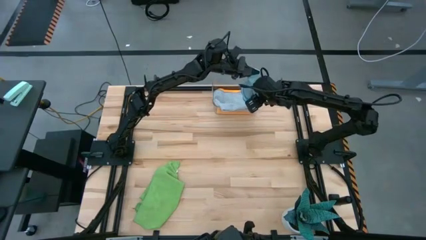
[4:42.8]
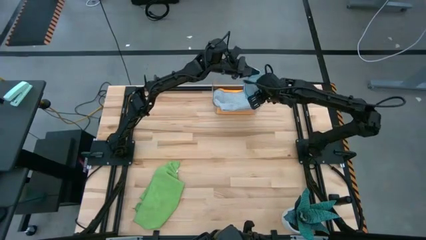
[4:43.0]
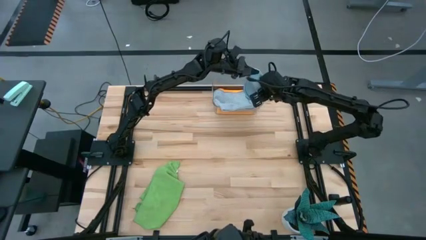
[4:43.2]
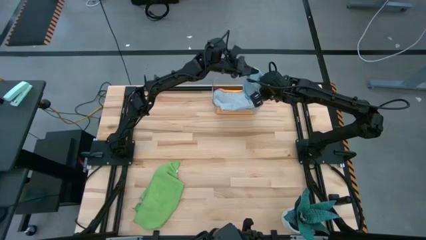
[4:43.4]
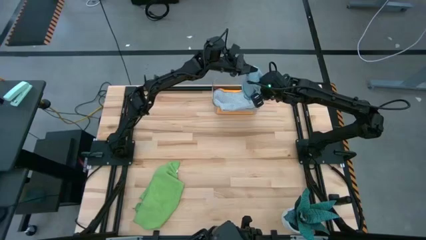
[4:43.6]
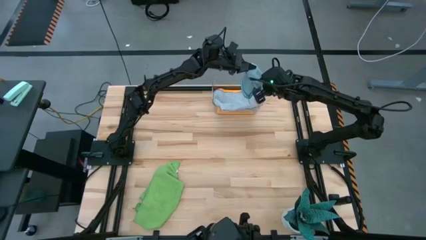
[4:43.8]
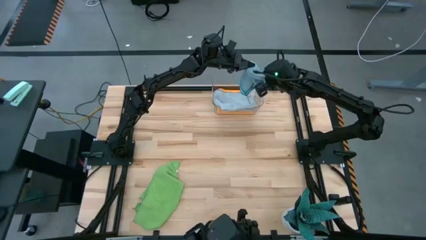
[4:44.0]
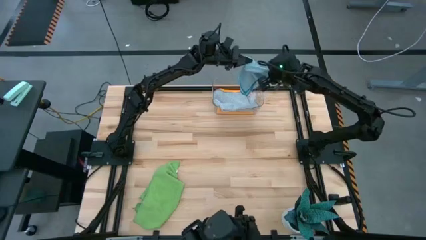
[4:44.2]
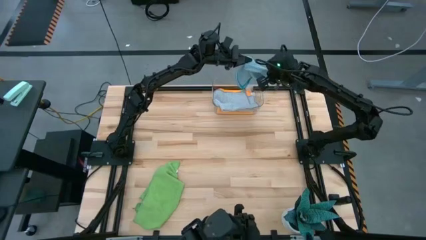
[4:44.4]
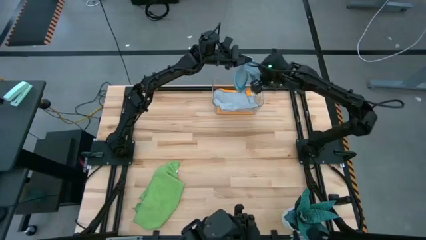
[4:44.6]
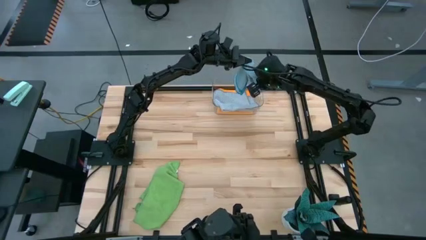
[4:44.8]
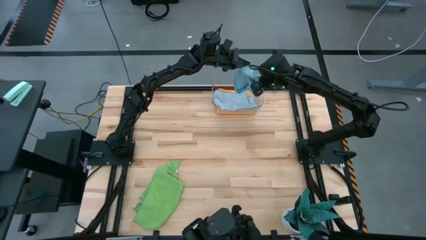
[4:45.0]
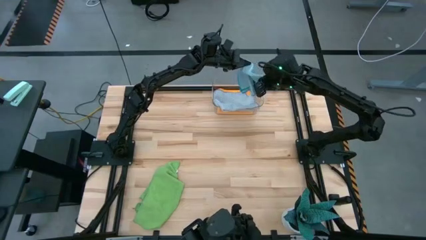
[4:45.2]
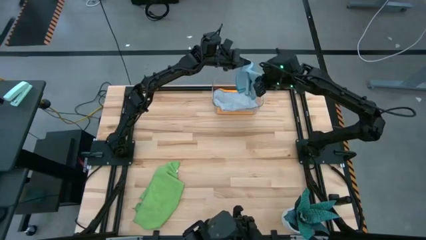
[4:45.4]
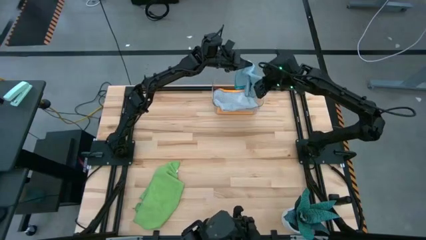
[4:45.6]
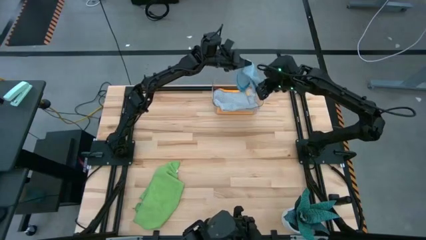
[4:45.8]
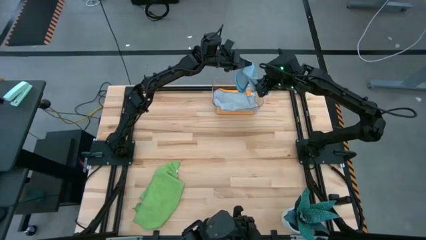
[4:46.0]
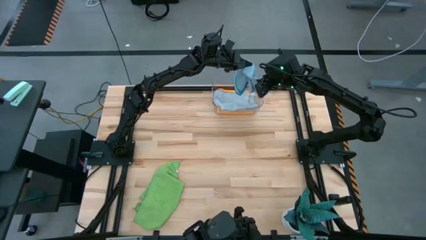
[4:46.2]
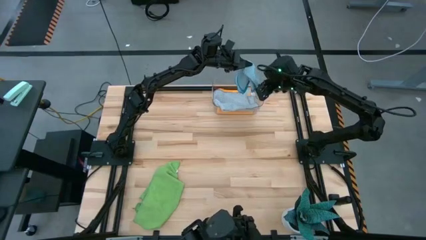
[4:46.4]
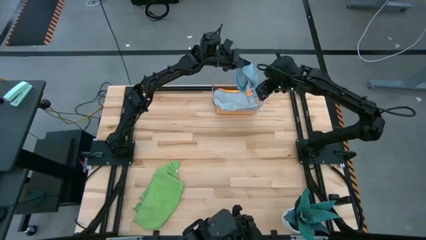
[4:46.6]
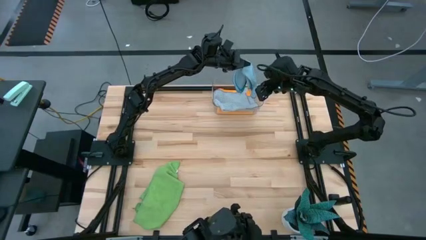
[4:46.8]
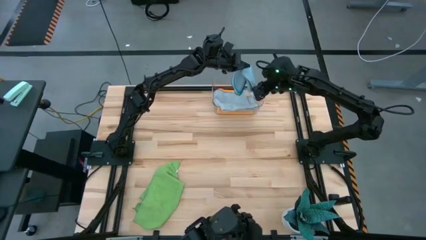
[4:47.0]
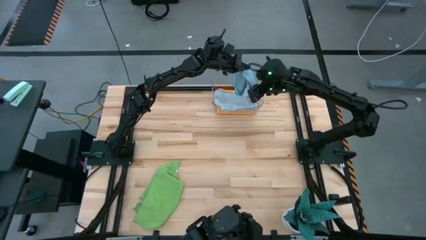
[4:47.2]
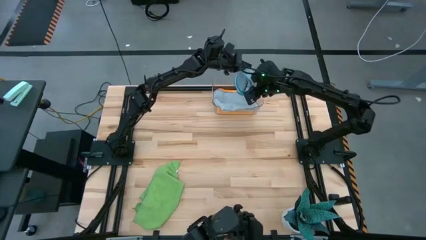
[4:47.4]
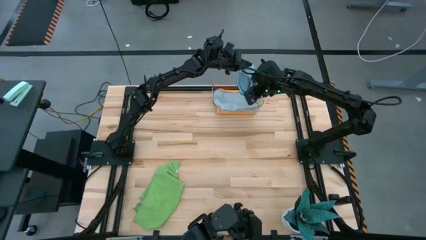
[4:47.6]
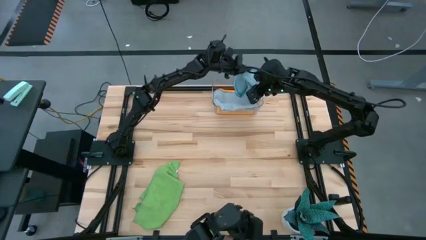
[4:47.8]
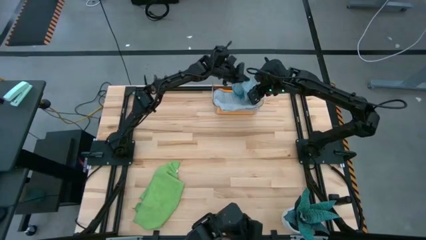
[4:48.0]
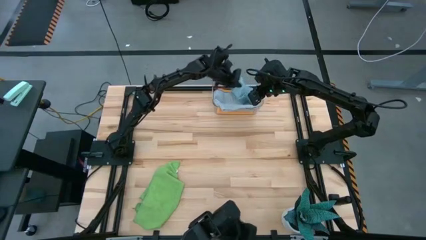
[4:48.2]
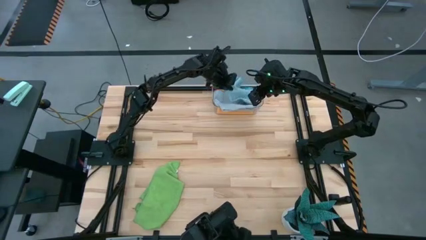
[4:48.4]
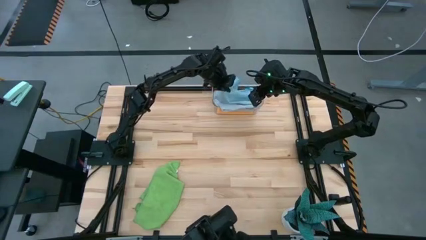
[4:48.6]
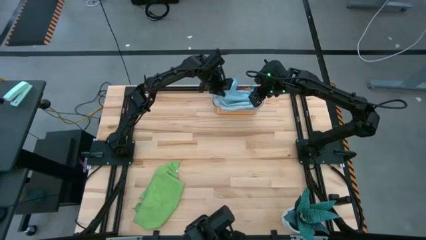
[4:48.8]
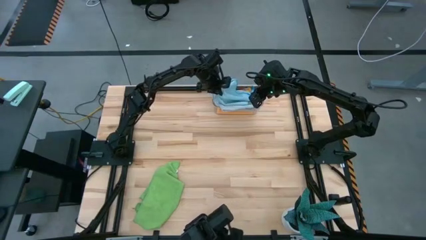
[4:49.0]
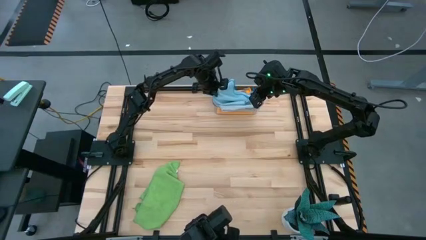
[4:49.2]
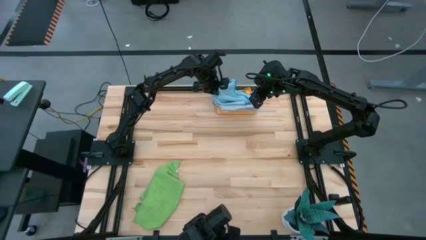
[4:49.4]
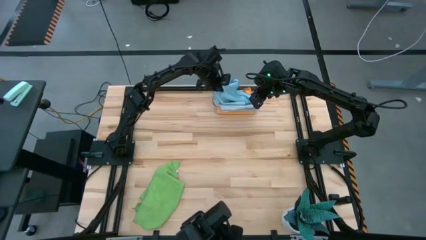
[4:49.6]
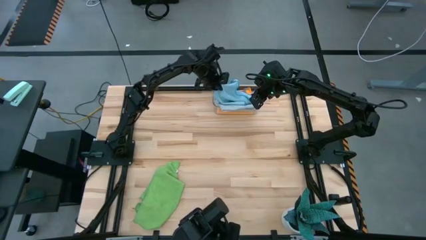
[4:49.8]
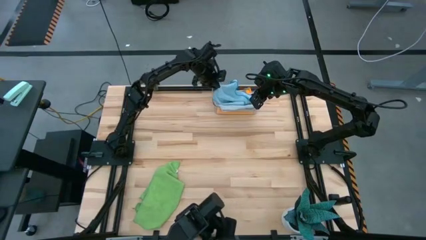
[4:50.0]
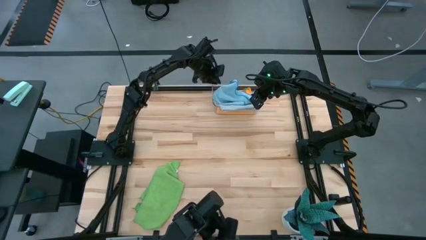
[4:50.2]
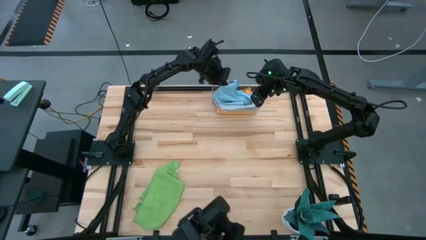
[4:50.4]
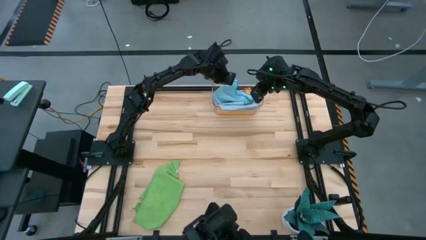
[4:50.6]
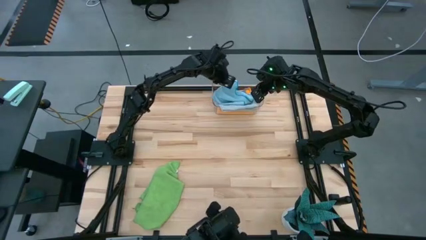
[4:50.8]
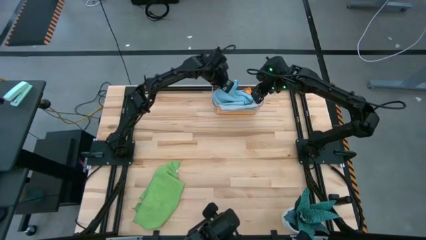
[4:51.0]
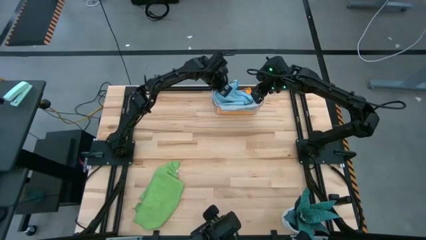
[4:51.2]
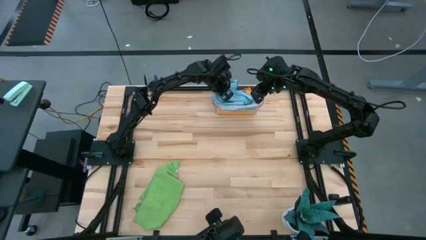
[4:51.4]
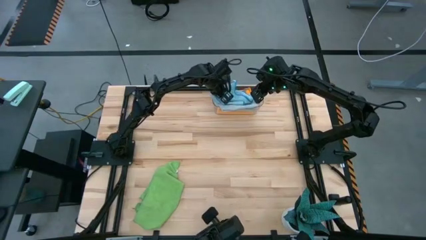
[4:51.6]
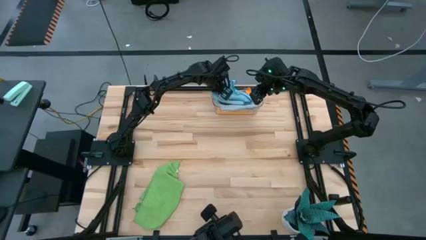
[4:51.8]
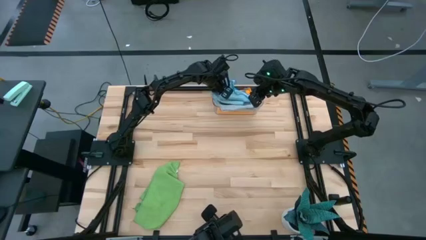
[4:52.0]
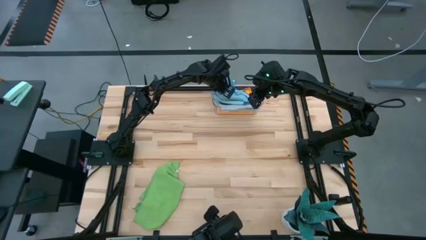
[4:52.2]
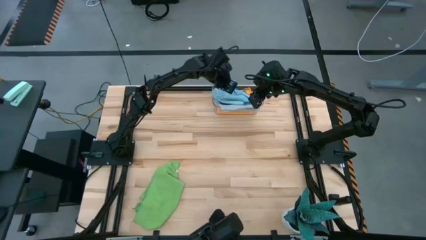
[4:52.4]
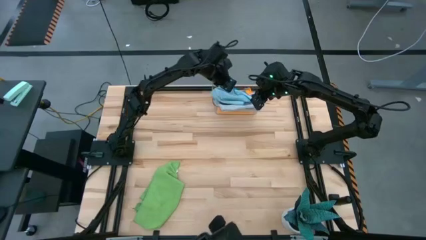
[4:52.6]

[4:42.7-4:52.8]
Task: Fold microfiber towels
Put the blue microfiber cloth into the transparent bin

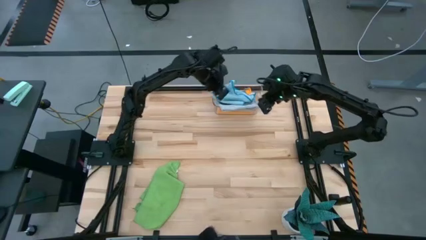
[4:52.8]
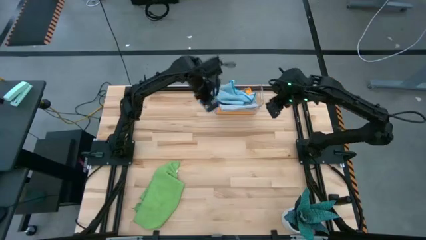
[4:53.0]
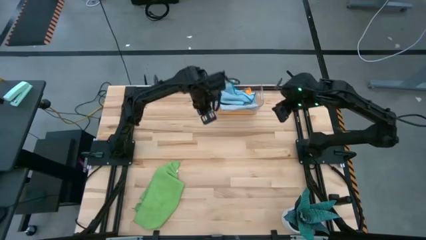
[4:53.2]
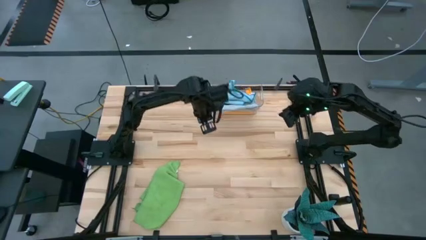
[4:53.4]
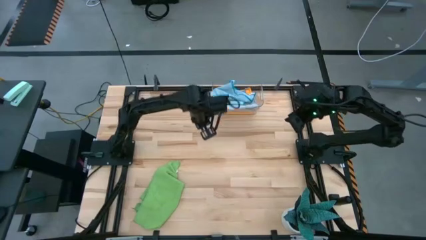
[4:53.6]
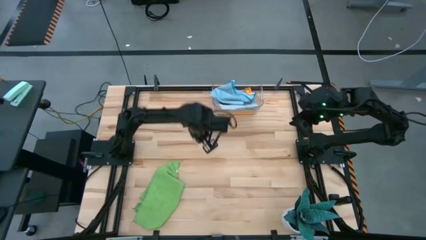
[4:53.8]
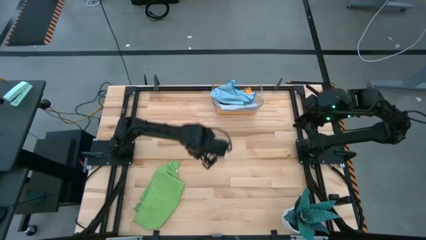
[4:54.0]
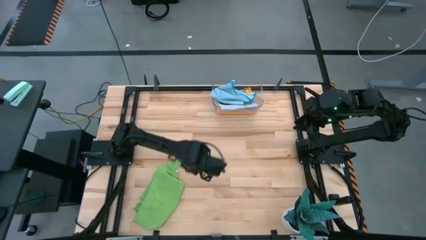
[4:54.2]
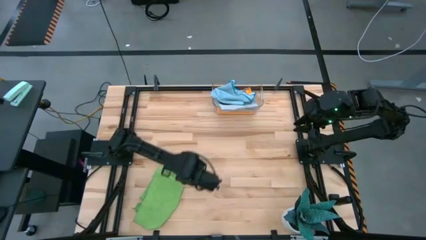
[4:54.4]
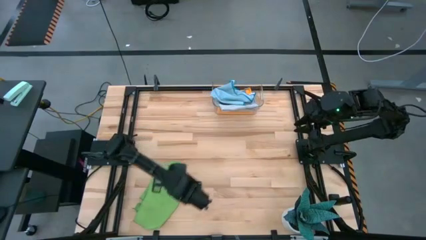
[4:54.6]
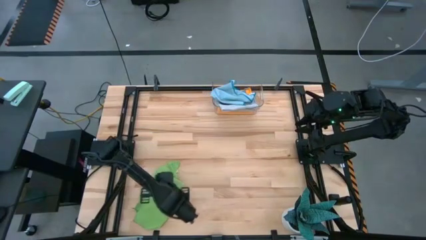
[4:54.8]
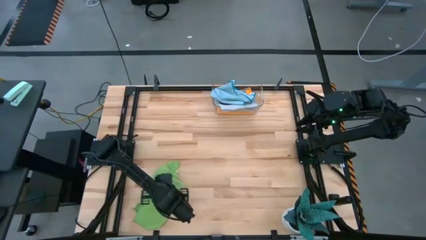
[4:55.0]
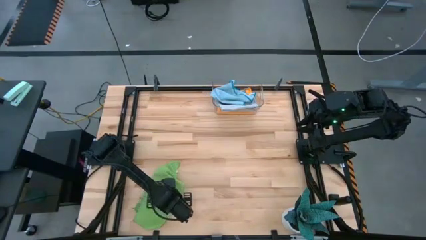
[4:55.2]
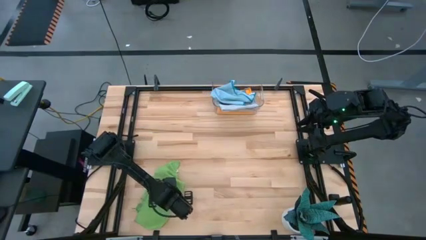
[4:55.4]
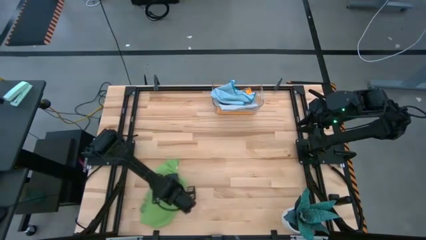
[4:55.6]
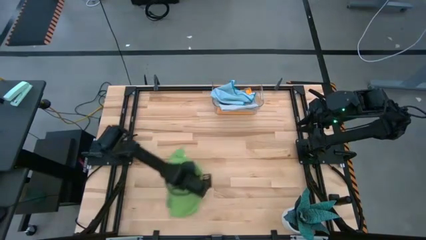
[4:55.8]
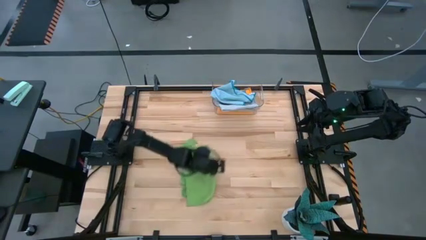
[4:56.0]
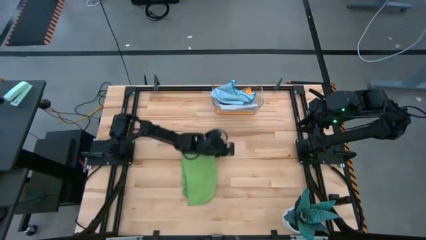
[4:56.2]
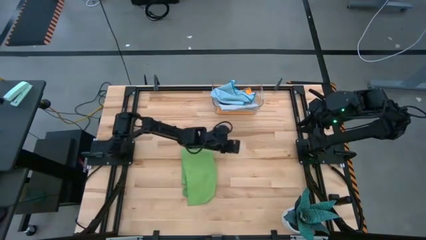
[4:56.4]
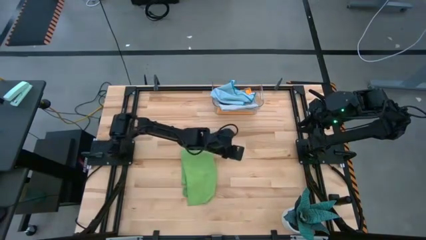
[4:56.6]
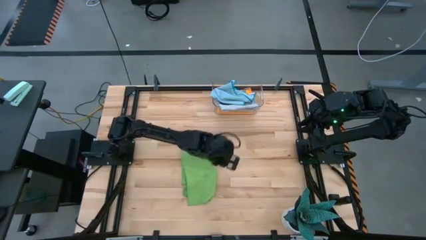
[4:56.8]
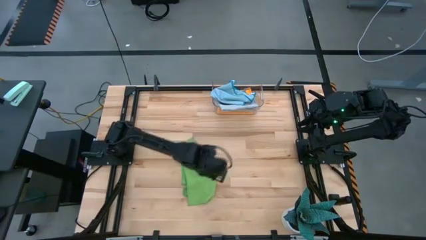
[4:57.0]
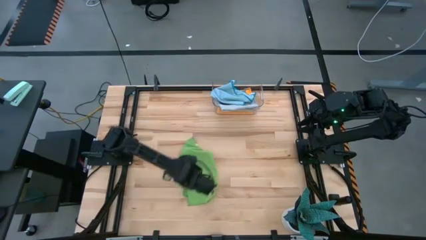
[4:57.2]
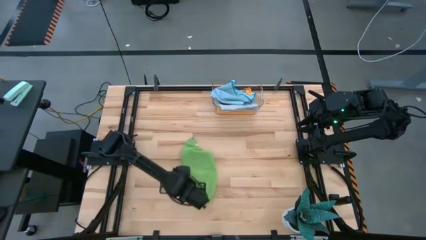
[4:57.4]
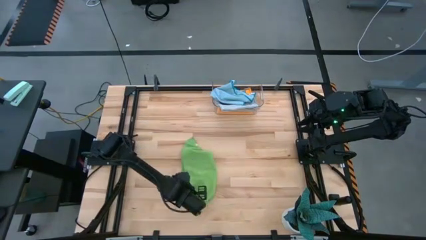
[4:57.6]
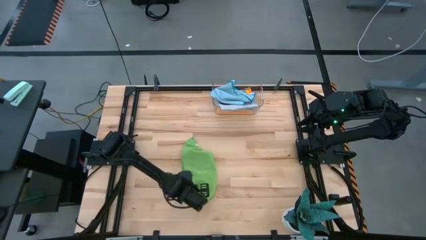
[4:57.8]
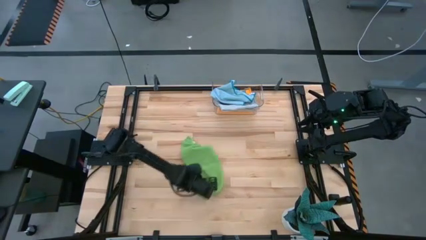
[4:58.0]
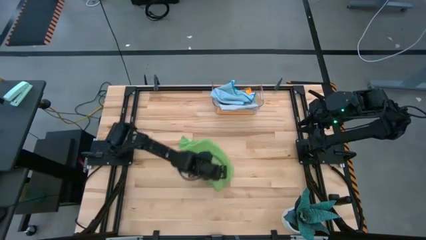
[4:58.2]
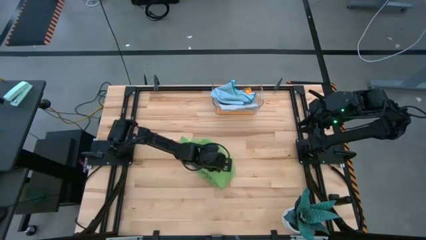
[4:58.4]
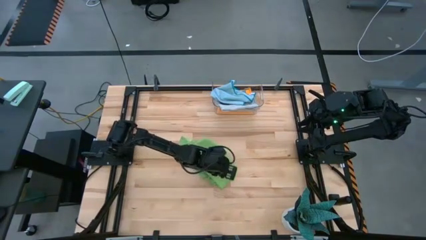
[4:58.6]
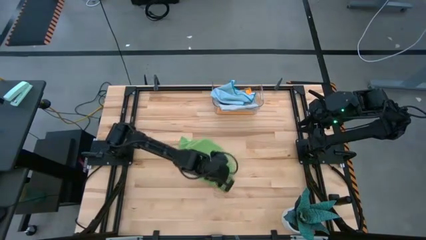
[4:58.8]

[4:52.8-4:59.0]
Move the green microfiber cloth to the center of the table
